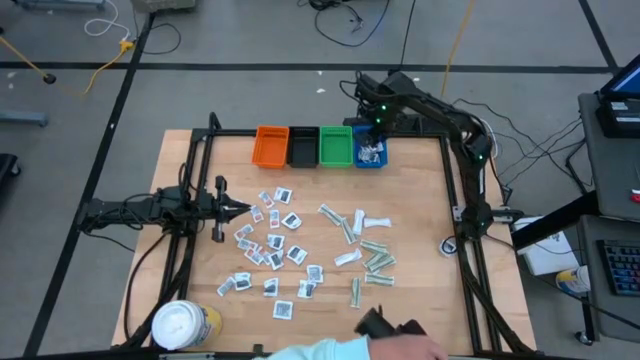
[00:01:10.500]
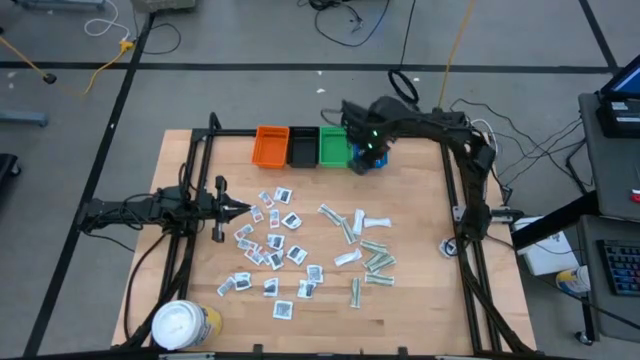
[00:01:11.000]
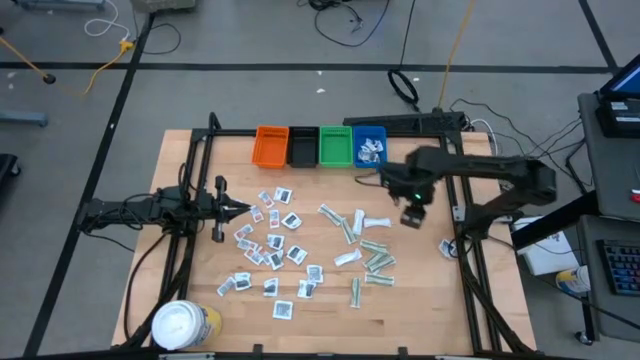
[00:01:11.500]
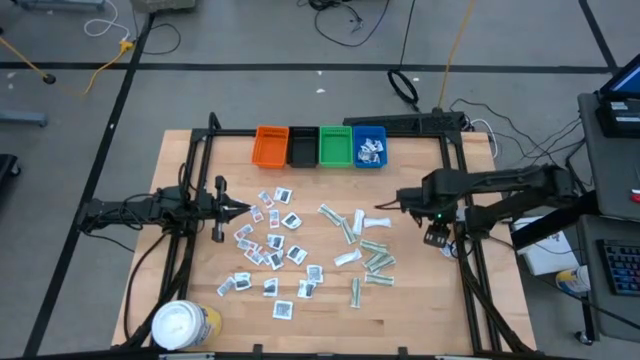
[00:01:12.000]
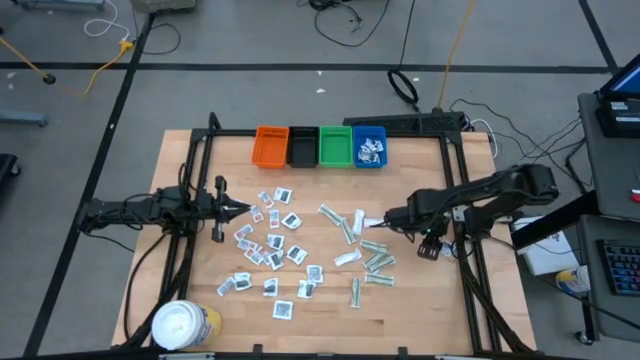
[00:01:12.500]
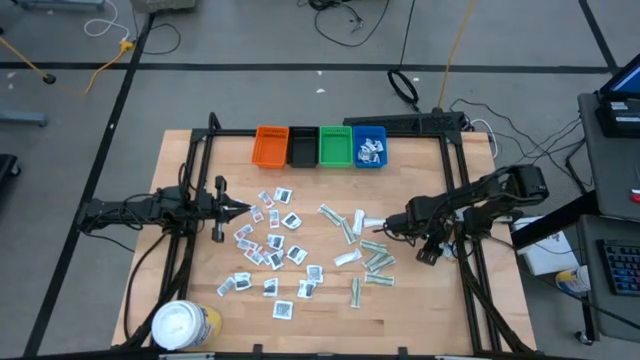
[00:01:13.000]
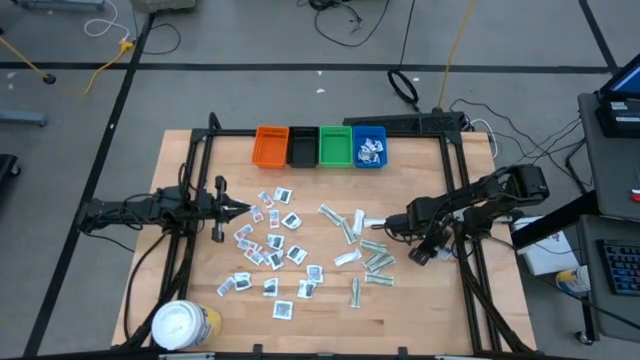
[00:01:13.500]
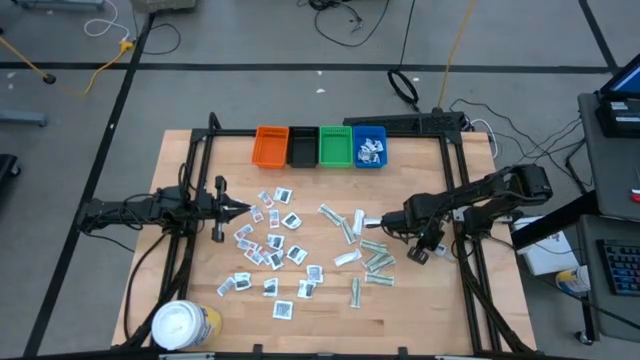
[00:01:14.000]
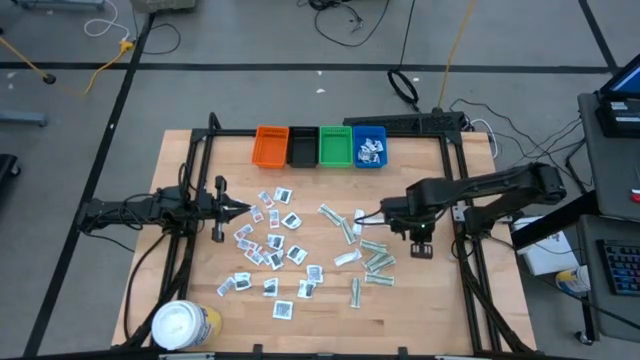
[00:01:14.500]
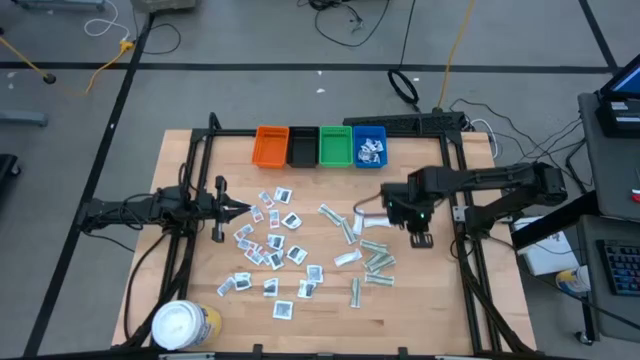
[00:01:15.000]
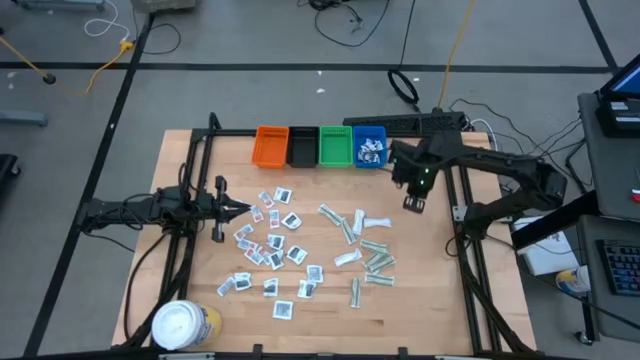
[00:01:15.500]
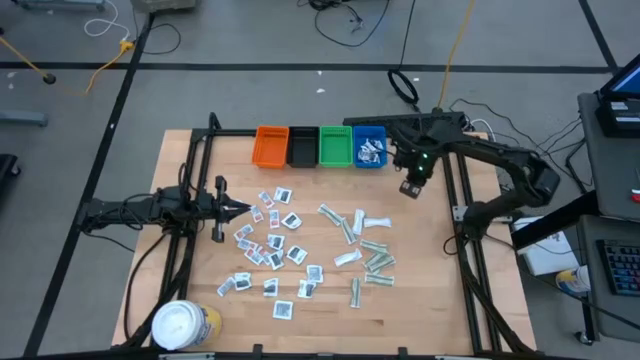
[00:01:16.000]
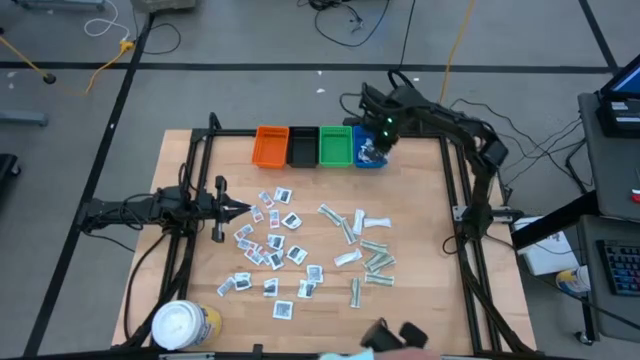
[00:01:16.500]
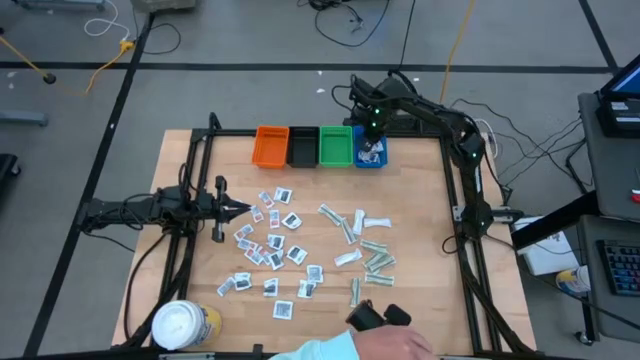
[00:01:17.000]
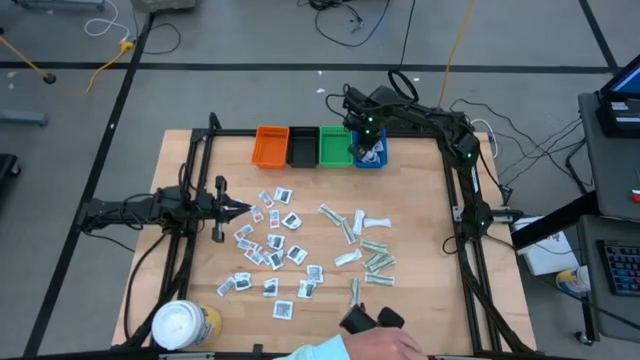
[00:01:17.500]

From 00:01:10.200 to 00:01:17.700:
Task: Pick & Place First Aid Supplies
Put the blue packet into the blue bin

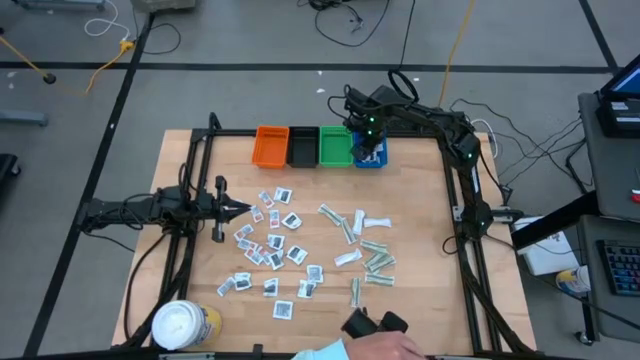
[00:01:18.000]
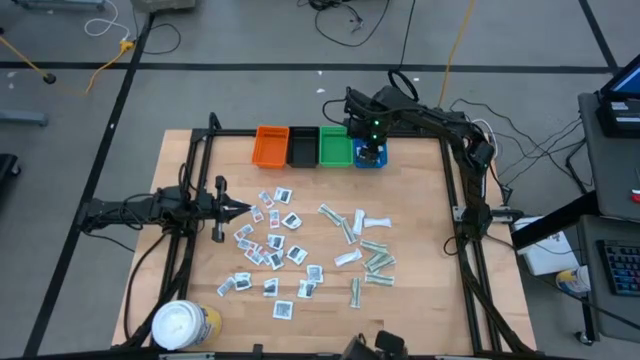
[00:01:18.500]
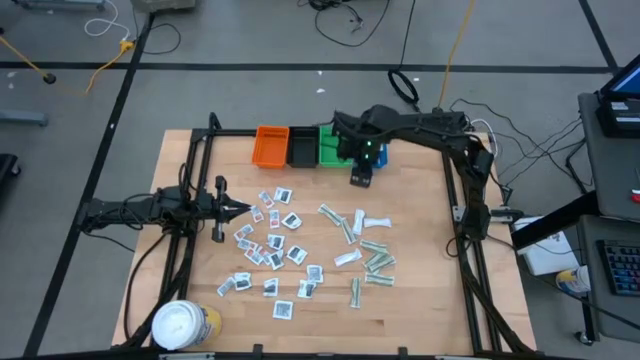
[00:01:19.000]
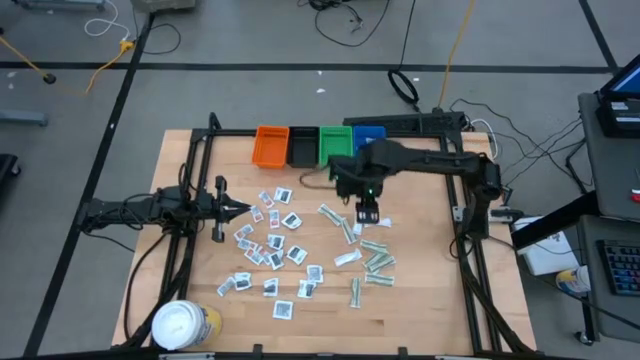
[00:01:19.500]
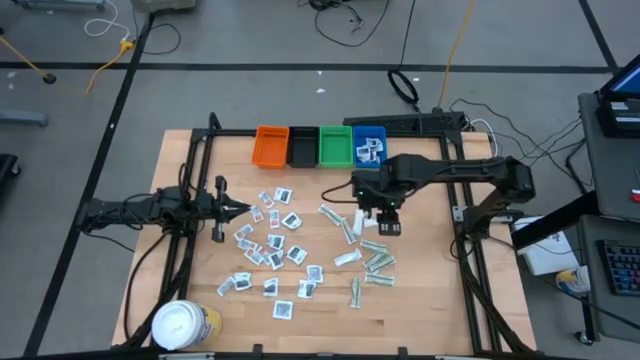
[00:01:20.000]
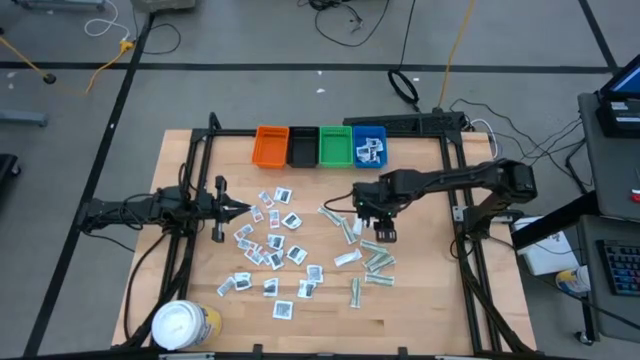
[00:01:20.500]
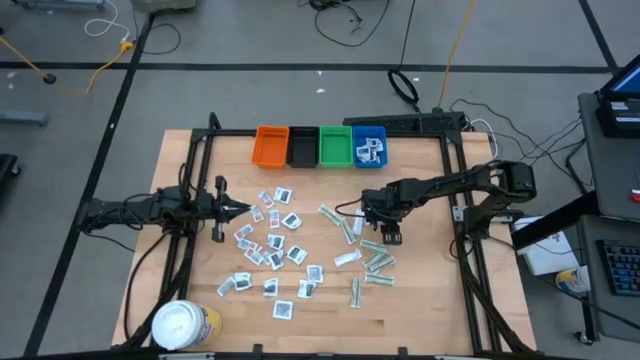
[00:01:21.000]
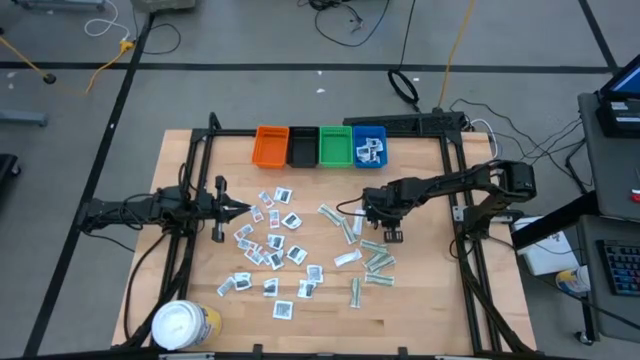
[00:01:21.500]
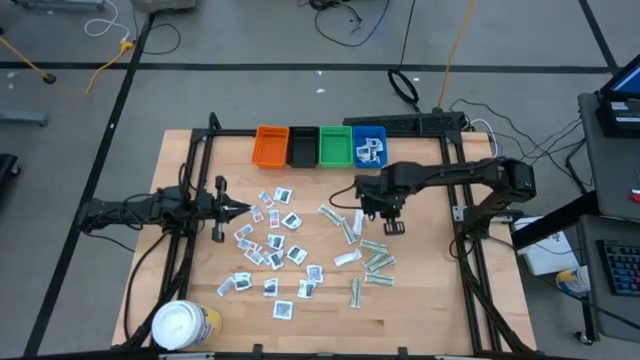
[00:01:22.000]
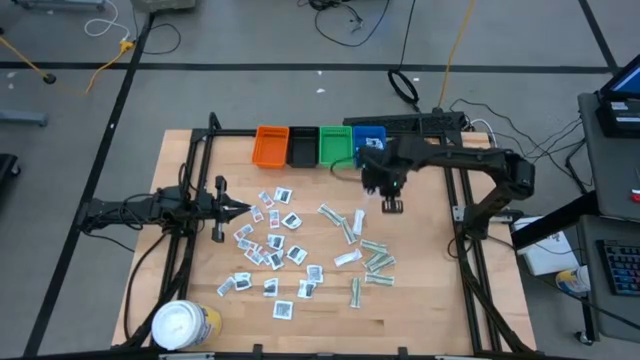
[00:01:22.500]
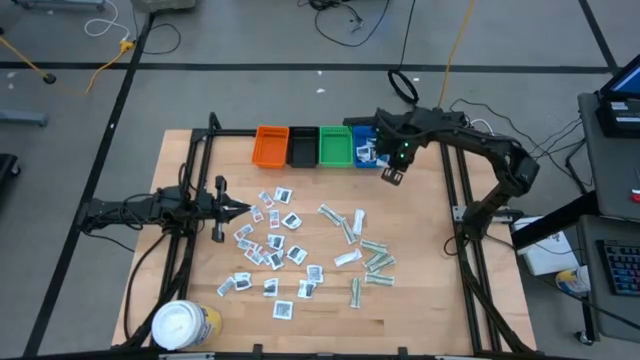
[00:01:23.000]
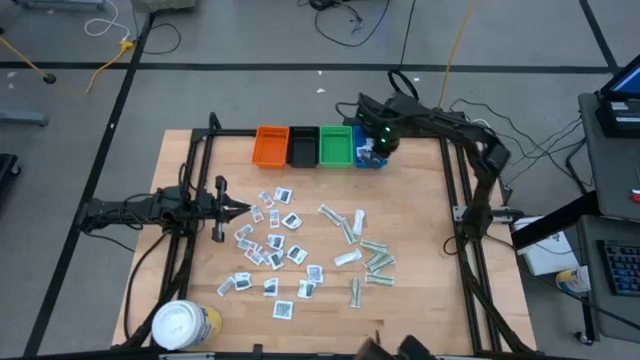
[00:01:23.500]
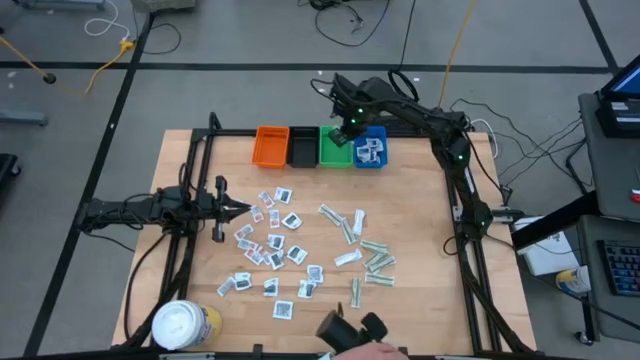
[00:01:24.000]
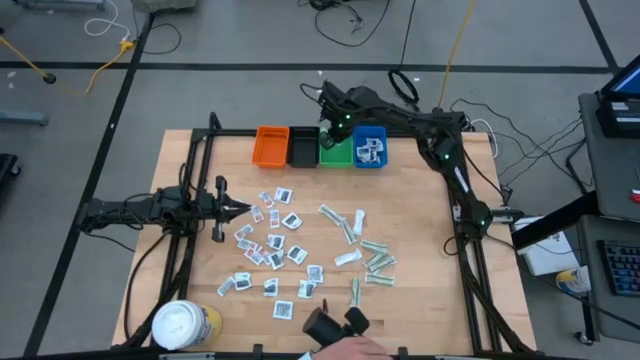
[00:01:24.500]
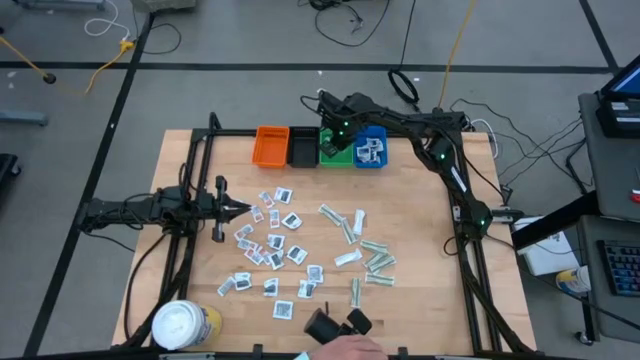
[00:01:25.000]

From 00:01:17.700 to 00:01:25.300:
Put the green bandage into the green bin

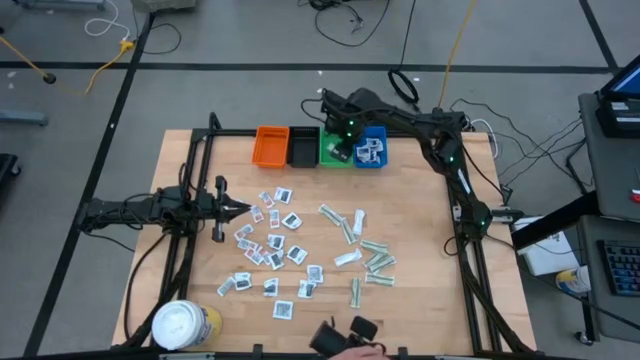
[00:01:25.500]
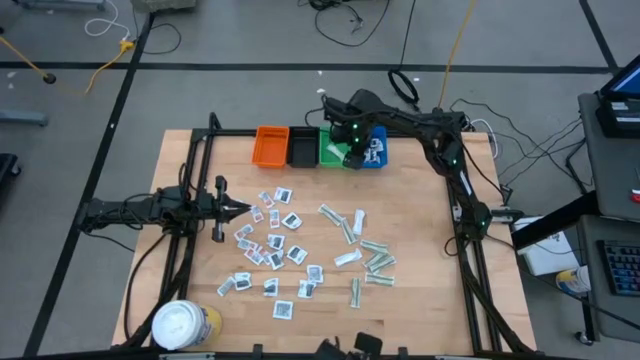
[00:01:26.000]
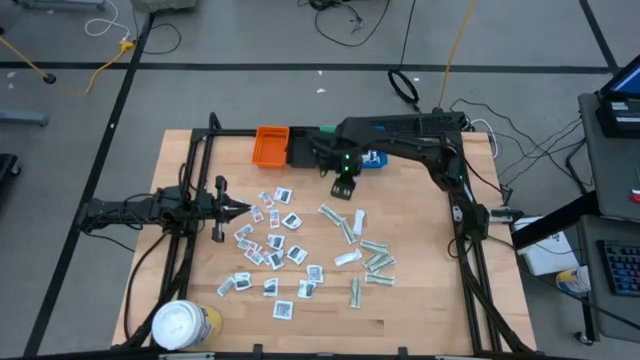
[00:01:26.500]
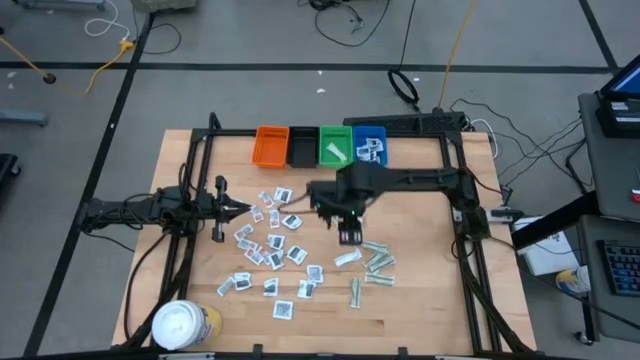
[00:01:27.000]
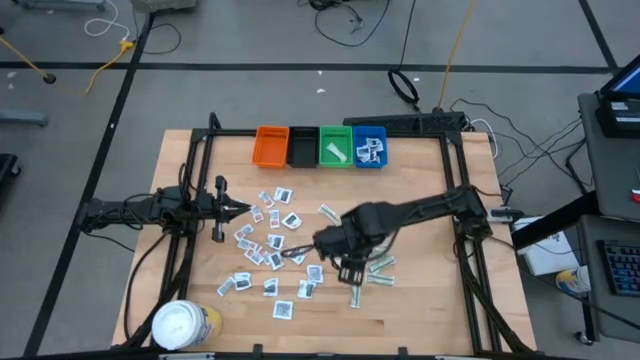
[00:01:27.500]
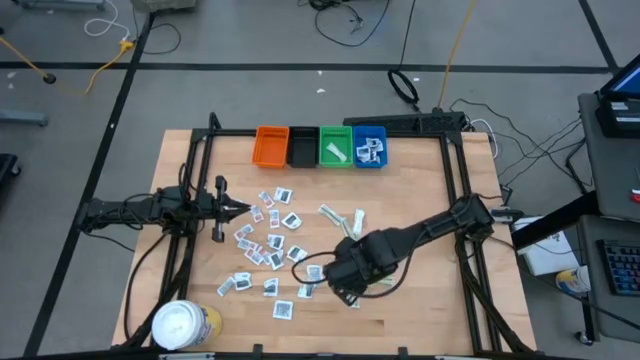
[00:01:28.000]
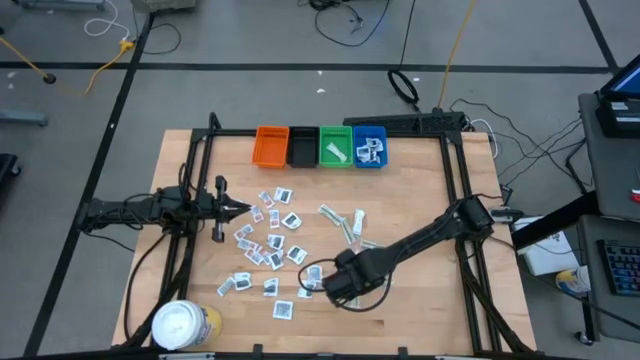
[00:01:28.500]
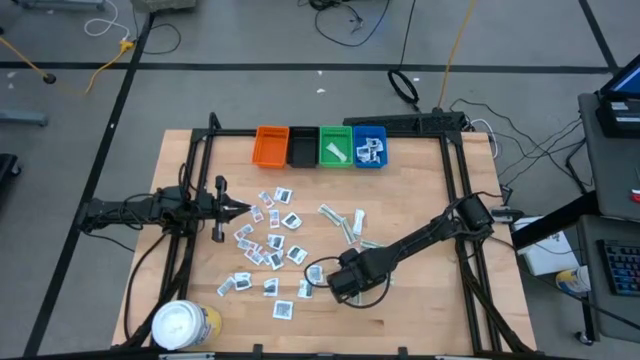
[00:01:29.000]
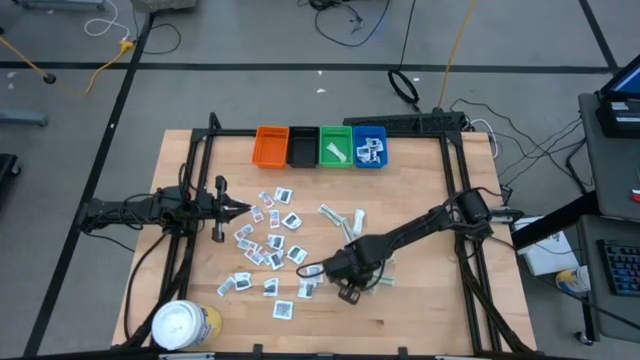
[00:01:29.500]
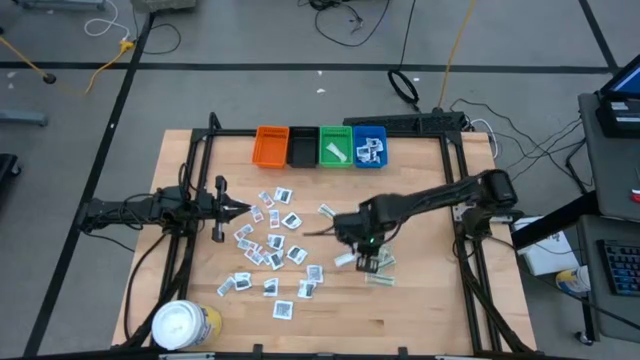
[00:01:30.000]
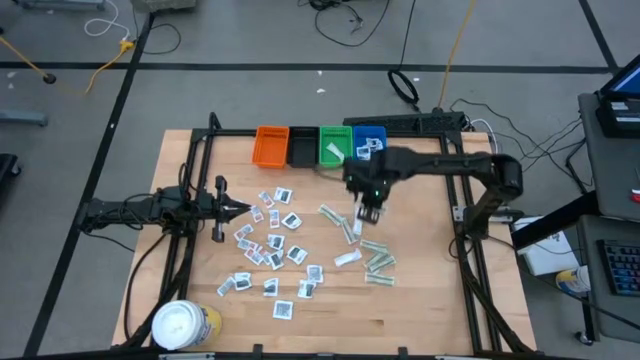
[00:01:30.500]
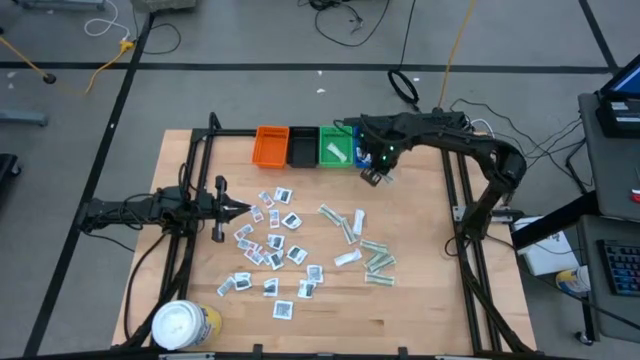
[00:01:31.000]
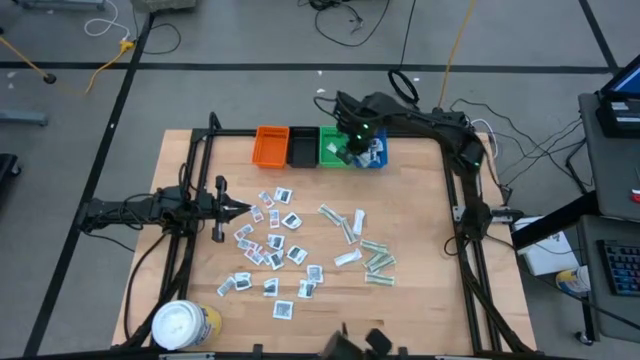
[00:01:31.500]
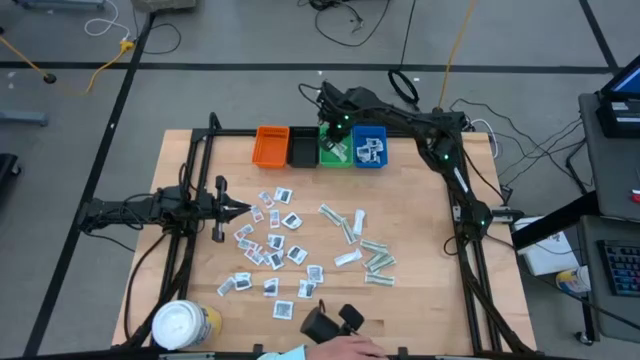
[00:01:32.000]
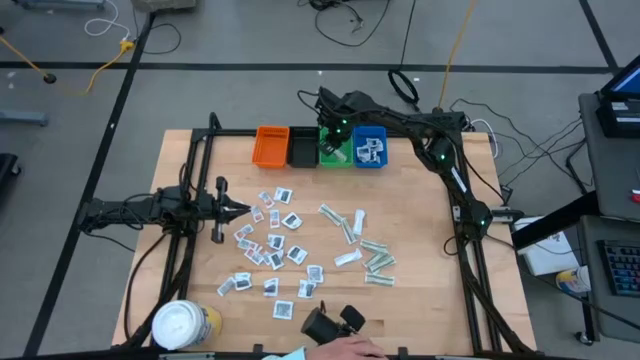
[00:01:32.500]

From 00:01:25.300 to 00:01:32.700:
Put the green bandage into the green bin
